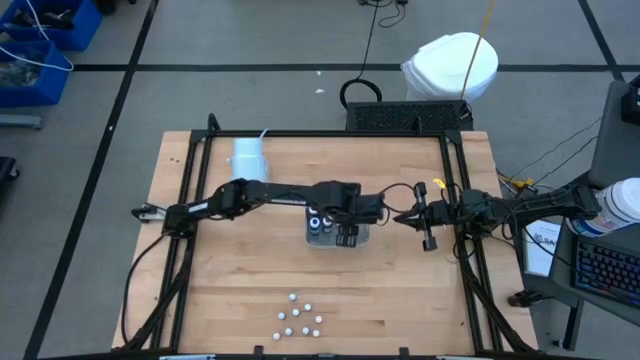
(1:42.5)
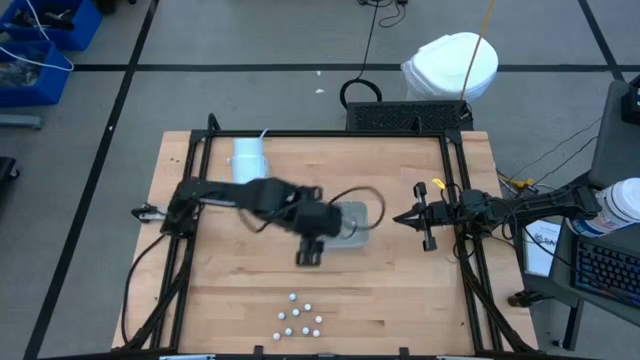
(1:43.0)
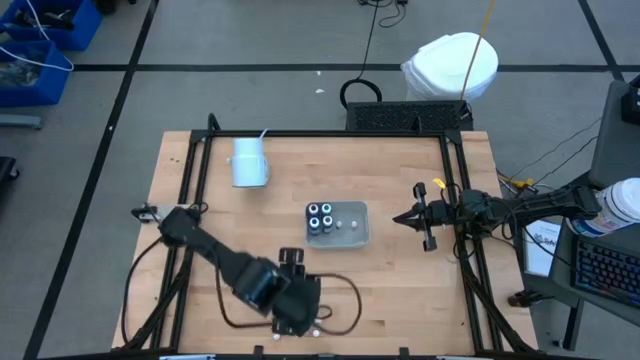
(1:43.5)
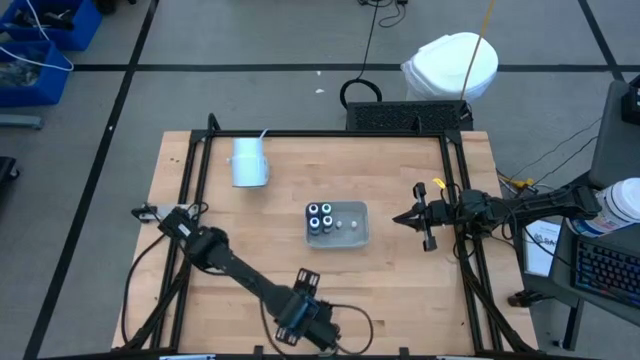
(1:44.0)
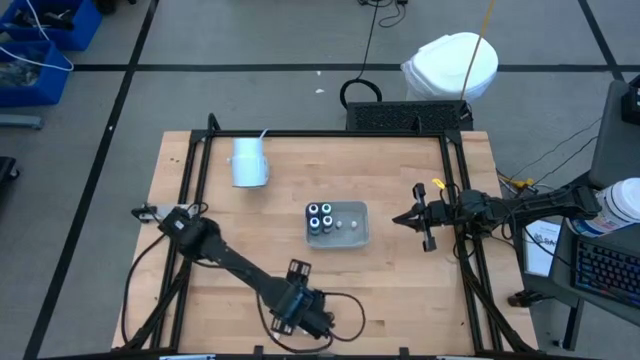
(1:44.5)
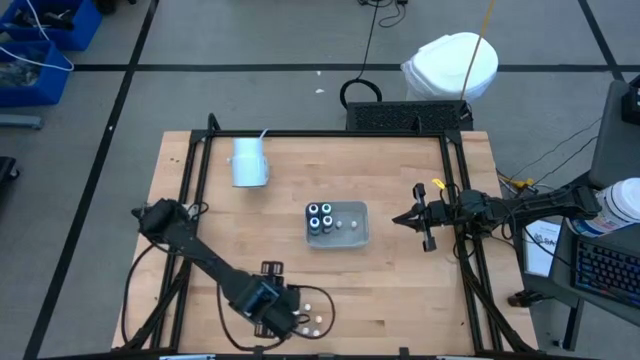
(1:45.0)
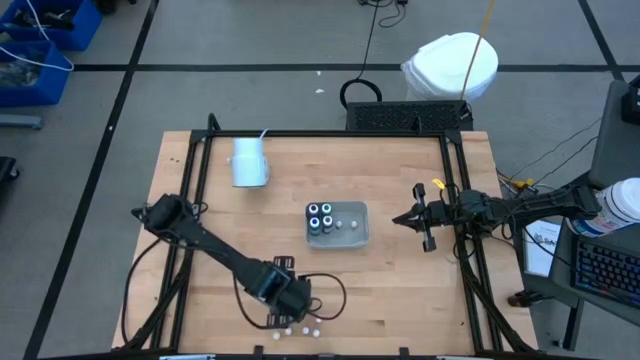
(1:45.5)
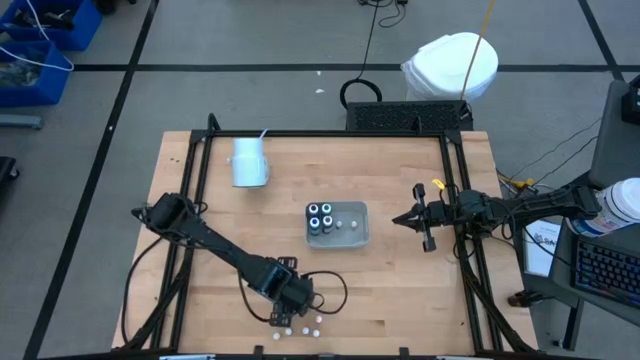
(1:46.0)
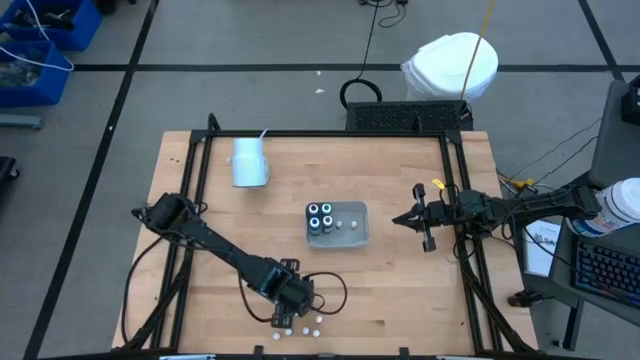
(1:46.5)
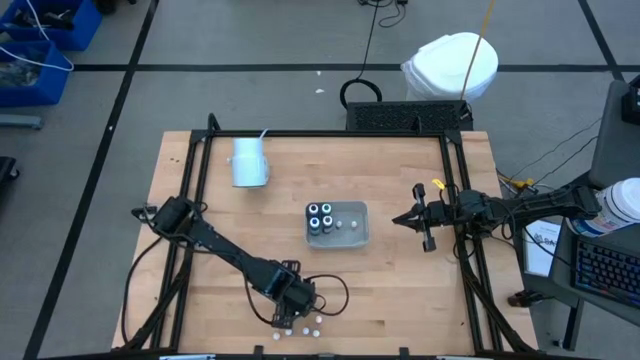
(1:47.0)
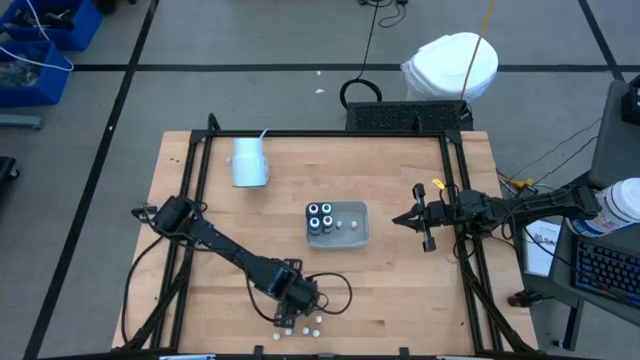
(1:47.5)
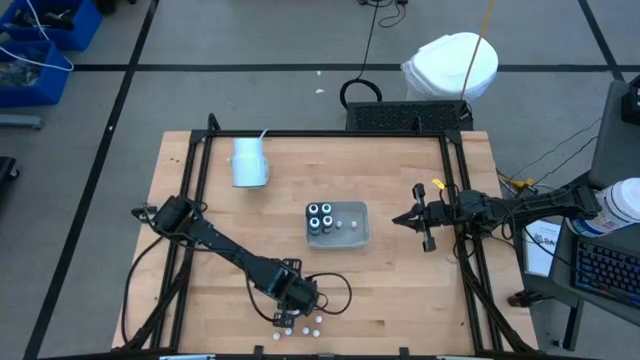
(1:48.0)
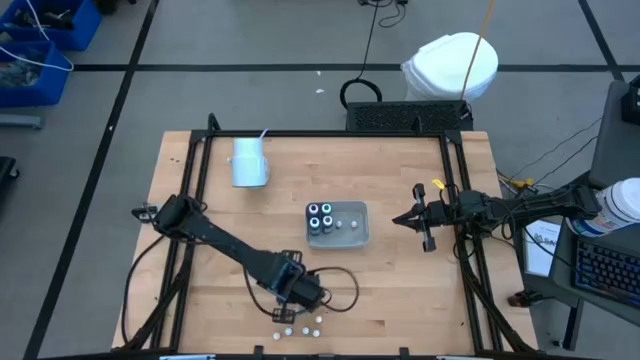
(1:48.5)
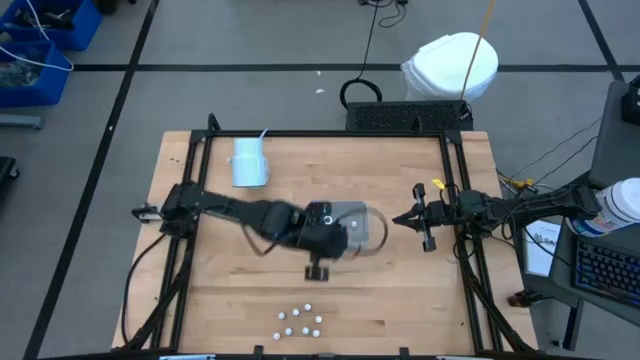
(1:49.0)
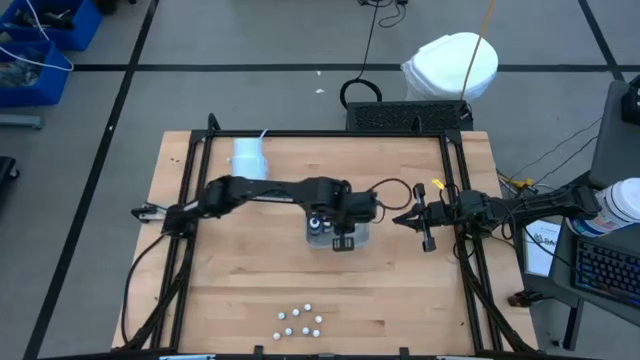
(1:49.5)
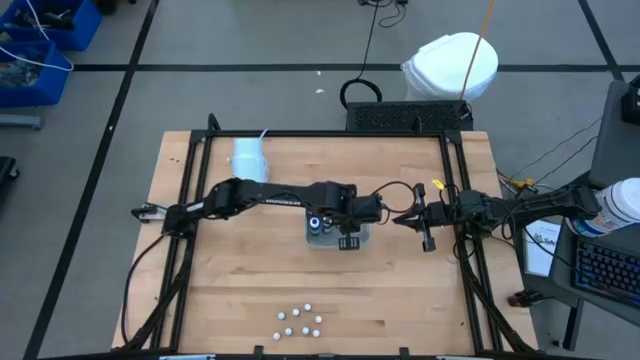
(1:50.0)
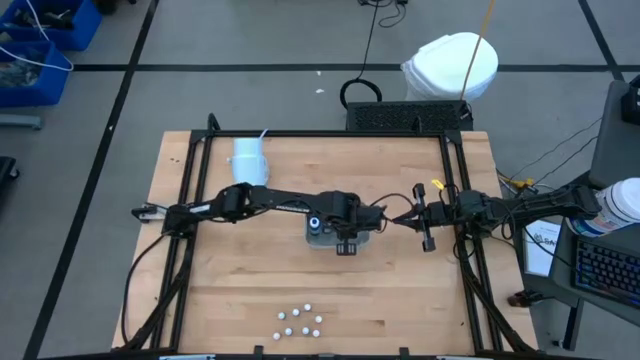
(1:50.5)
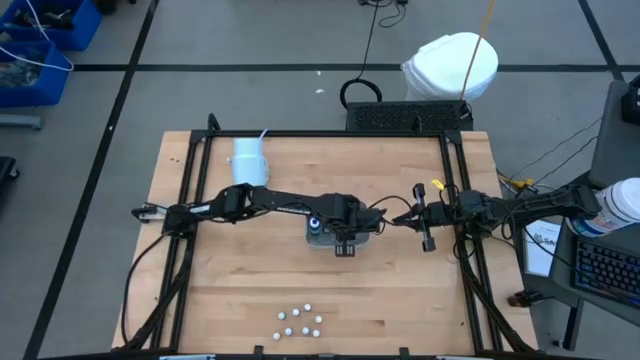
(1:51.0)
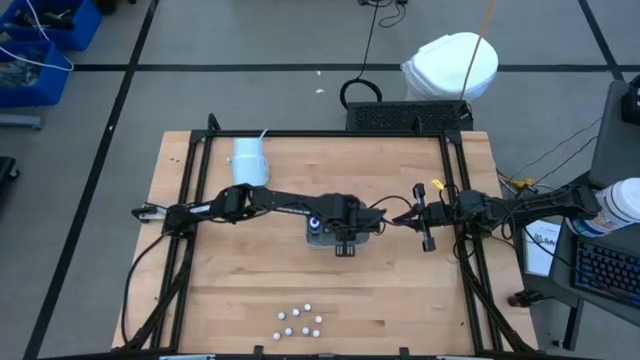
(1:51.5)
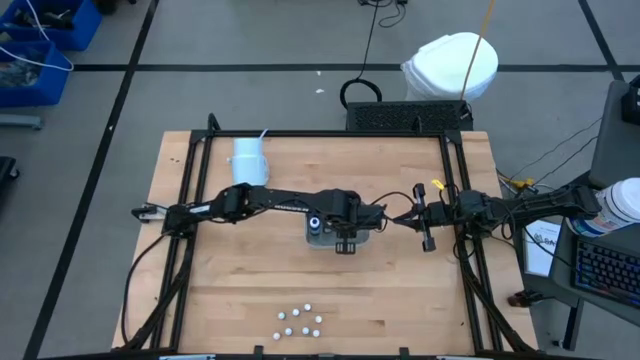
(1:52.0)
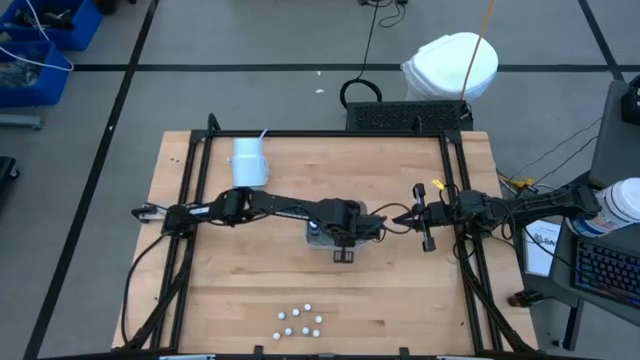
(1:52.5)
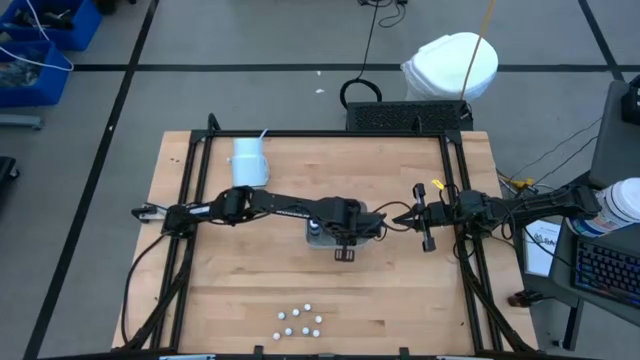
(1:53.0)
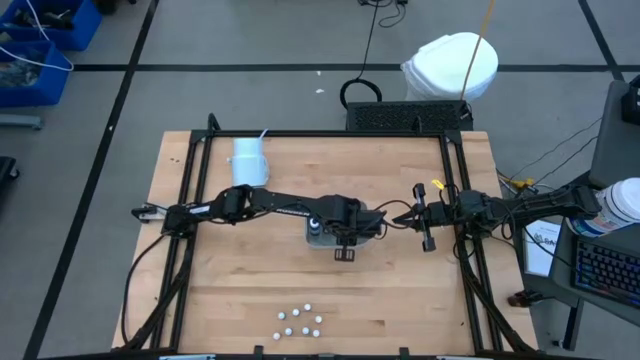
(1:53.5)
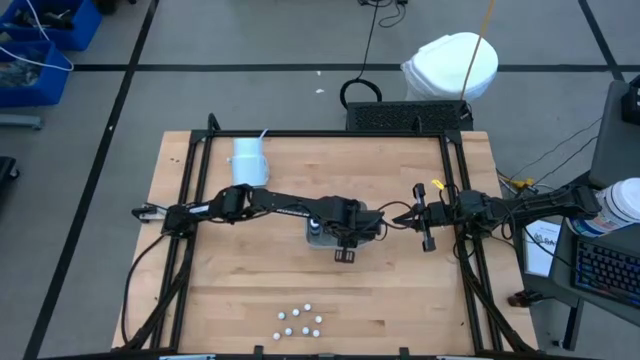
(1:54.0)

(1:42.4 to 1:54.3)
Task: Pick & Place food coloring
Put the small green food coloring bottle into the white container

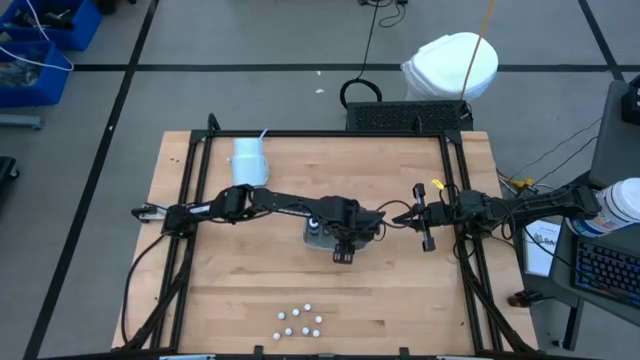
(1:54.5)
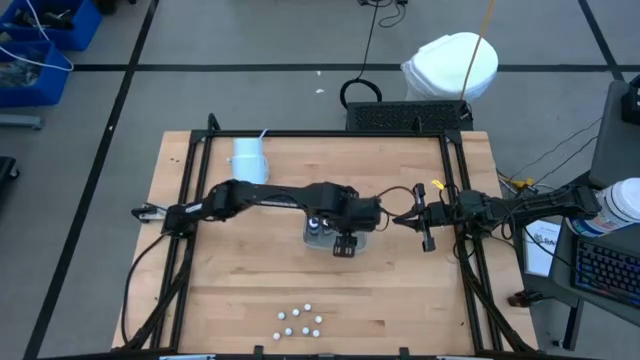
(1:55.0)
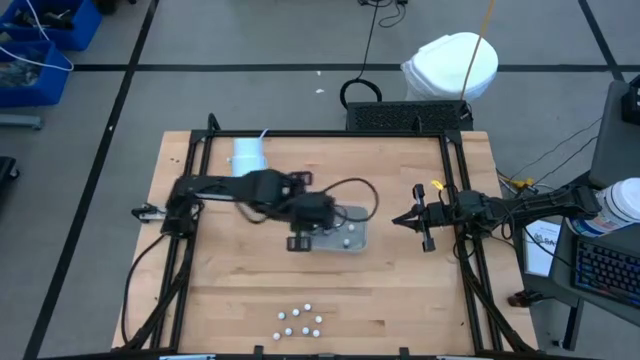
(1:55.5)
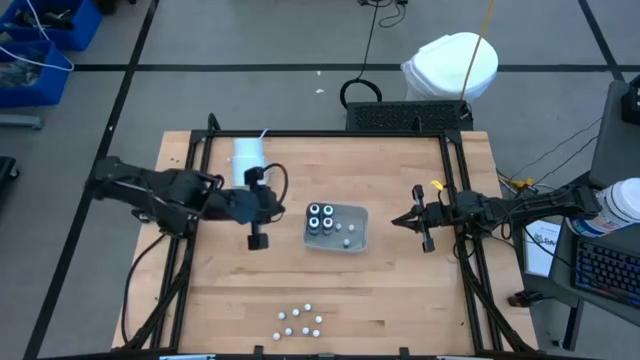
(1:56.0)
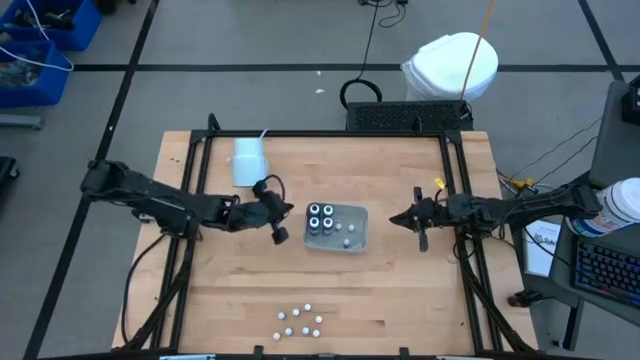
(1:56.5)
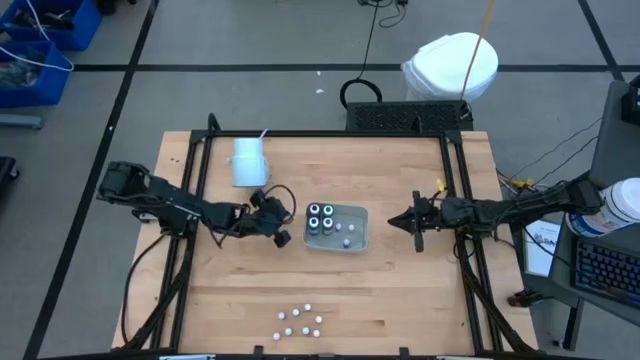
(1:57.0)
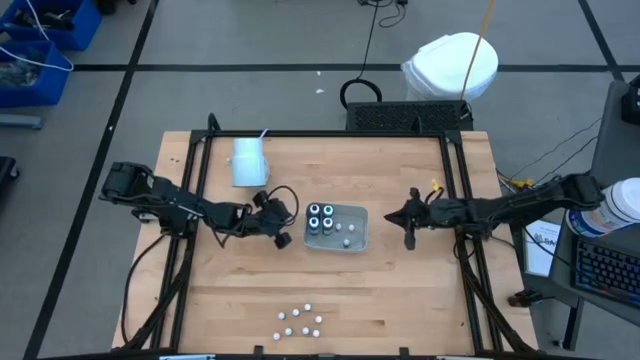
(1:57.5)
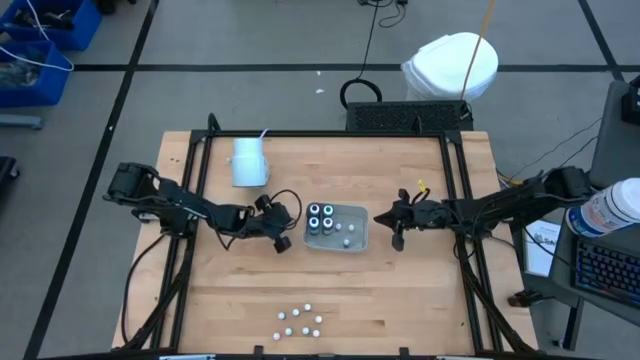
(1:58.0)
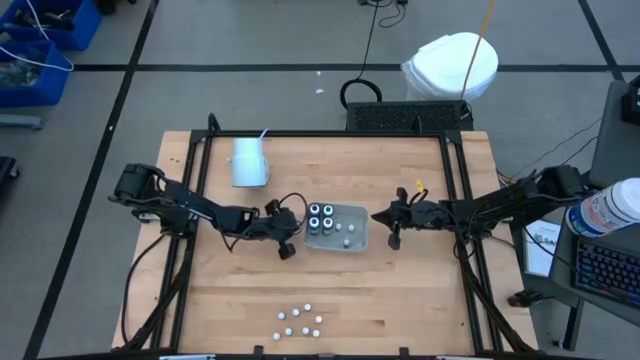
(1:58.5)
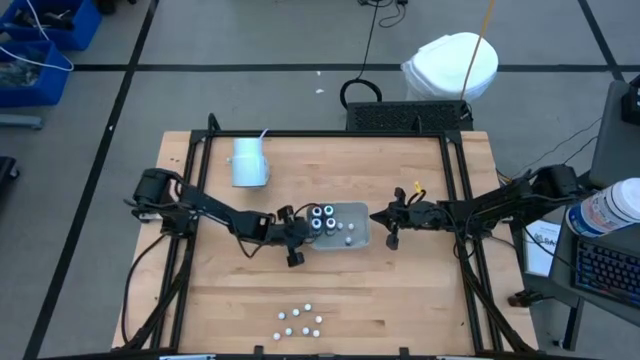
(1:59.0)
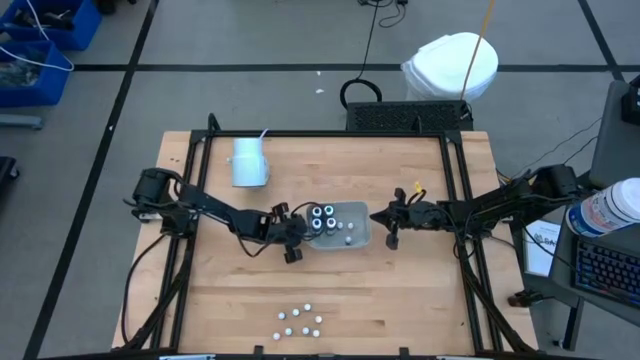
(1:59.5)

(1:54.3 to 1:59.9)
Adjust the white container

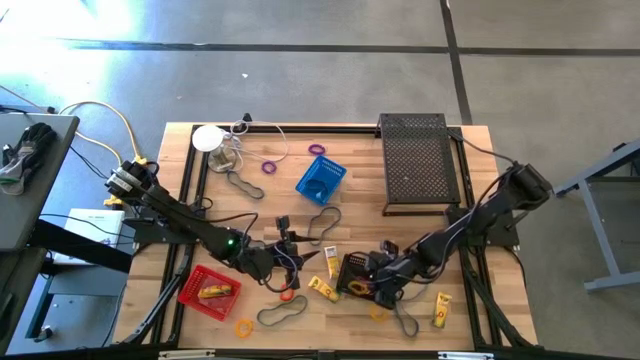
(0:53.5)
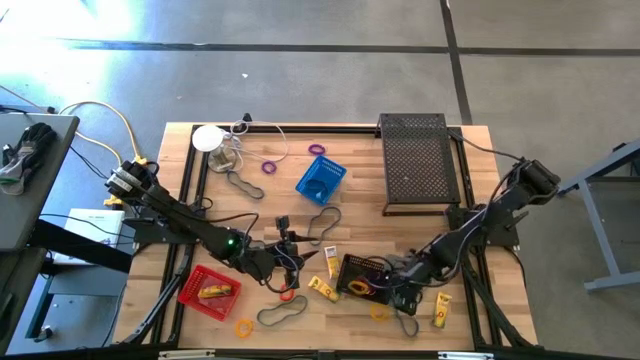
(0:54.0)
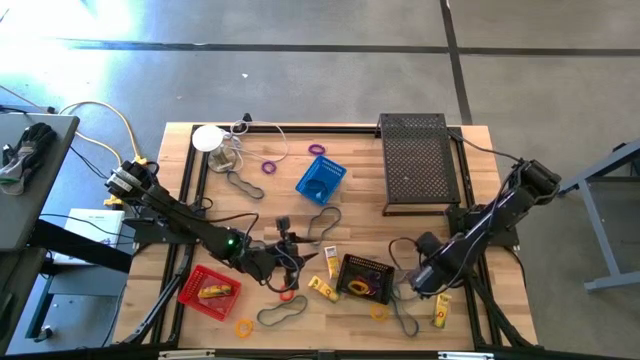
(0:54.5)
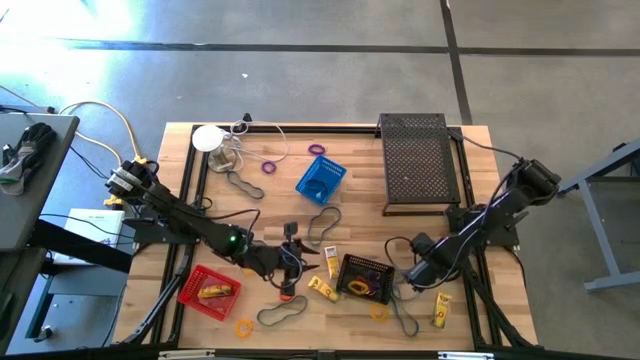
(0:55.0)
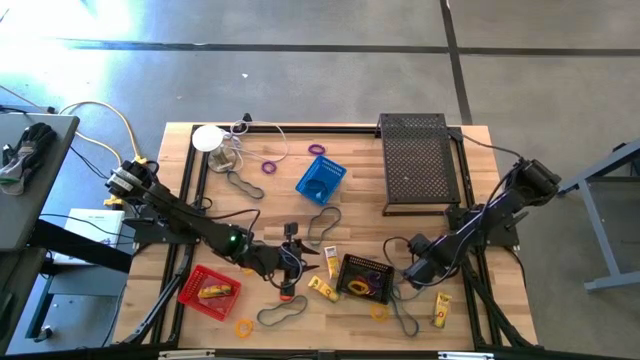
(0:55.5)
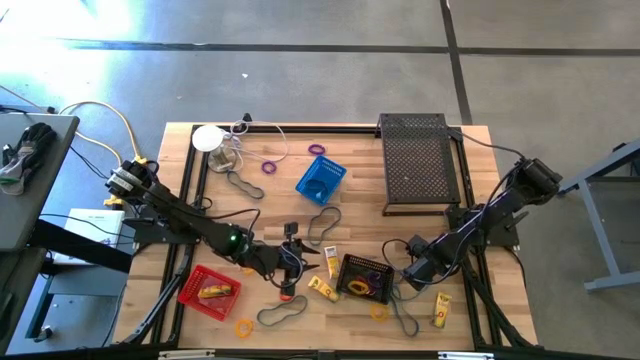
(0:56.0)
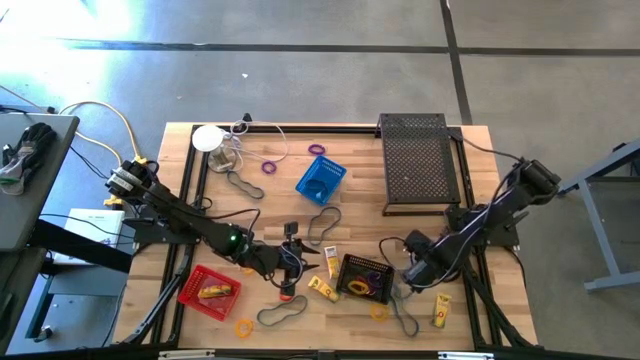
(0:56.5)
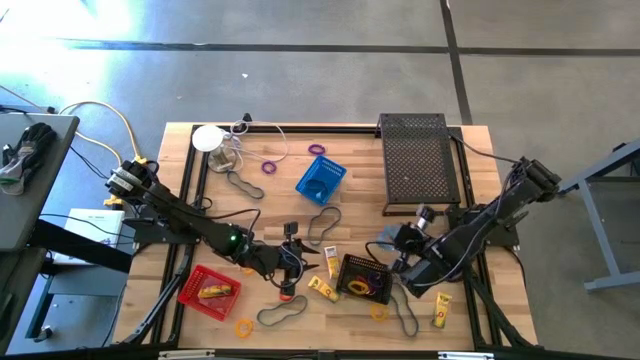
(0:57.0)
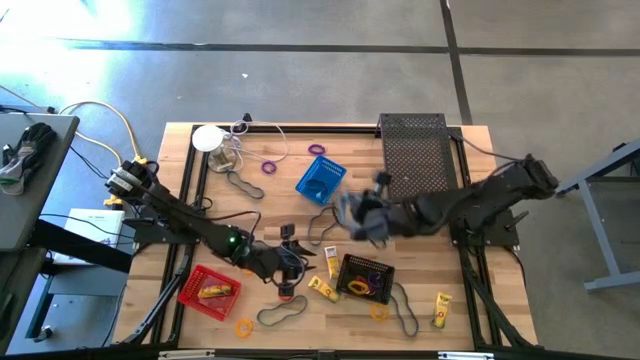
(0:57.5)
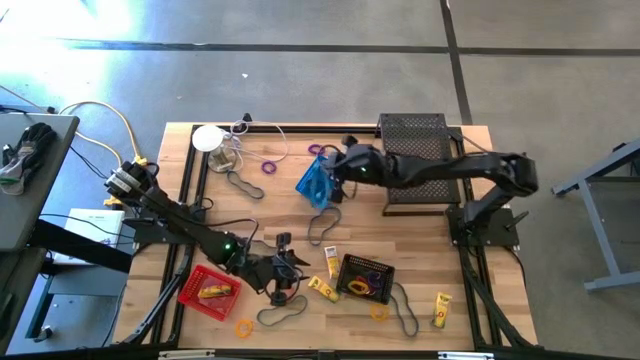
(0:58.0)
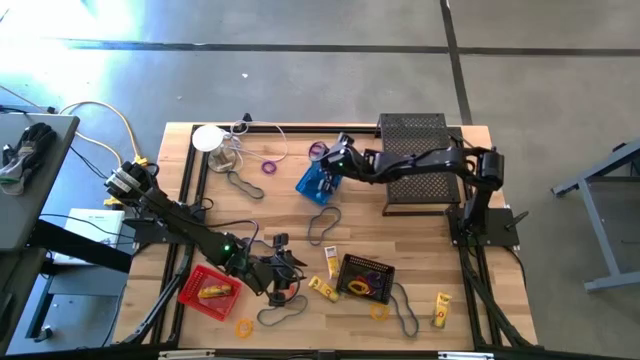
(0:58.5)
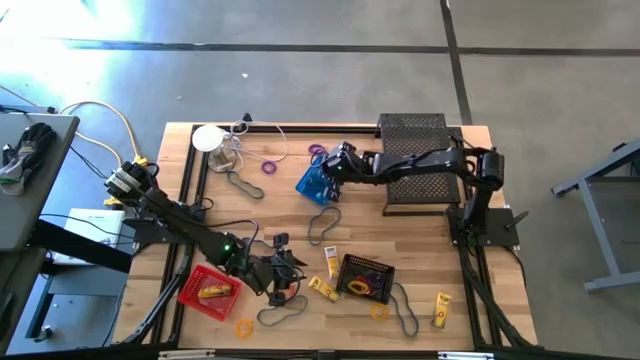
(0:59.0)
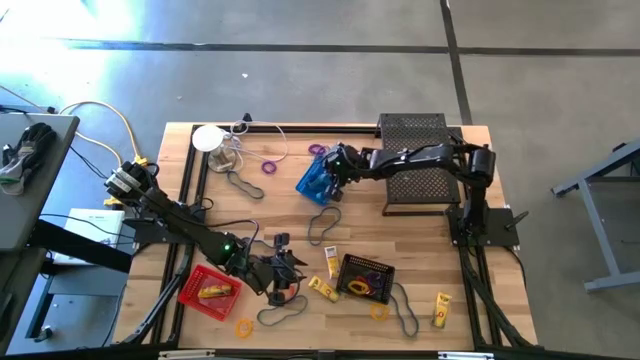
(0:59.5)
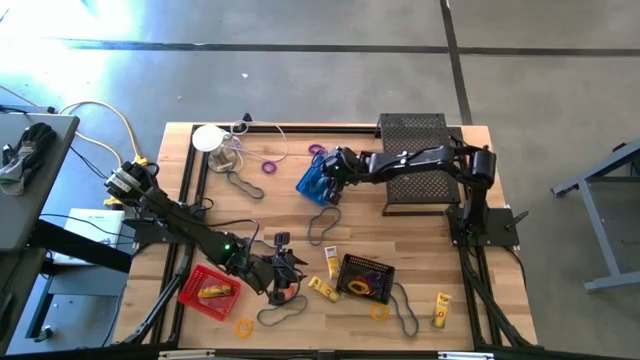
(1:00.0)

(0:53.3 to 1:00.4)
Task: Pick & Place Office Desk Supplies
Put the blue rubber band into the blue bin
